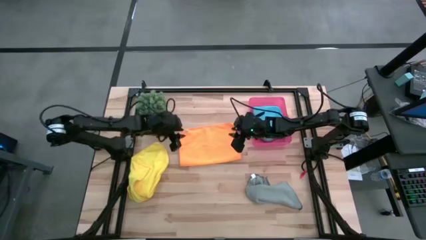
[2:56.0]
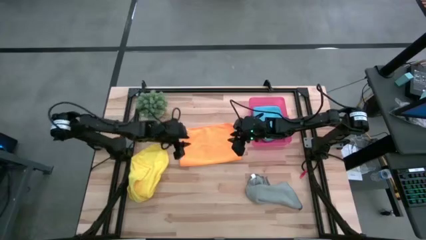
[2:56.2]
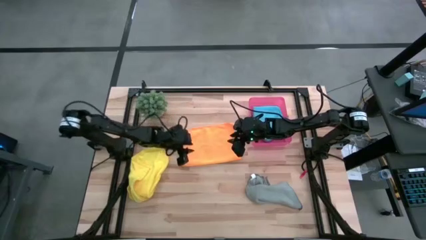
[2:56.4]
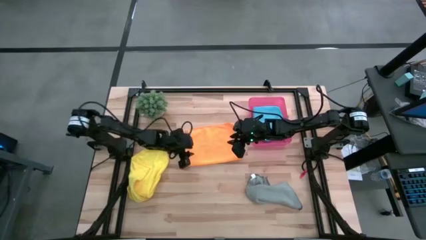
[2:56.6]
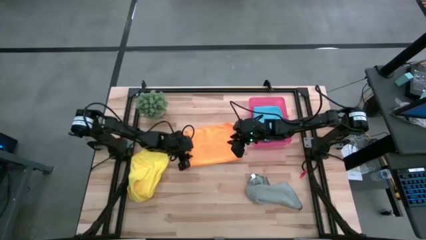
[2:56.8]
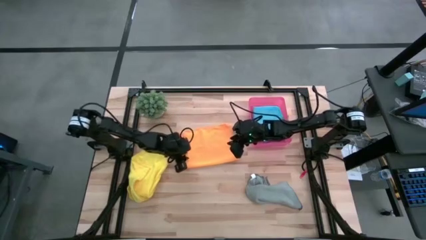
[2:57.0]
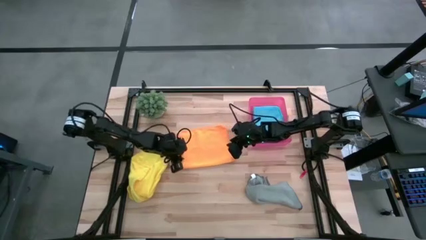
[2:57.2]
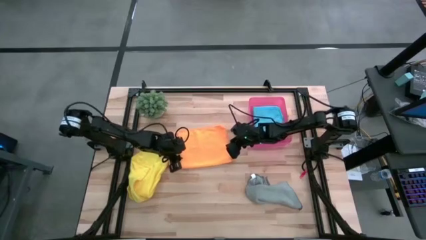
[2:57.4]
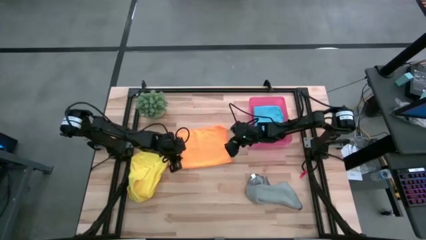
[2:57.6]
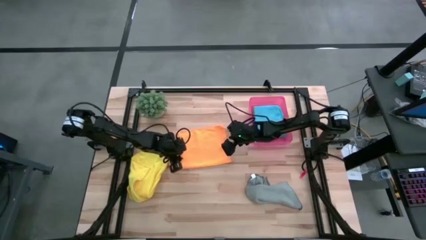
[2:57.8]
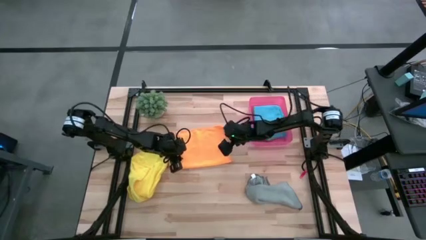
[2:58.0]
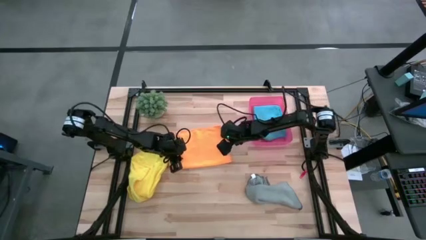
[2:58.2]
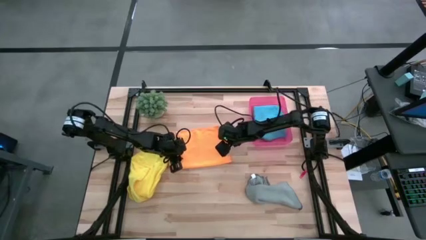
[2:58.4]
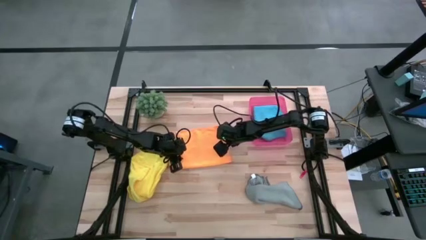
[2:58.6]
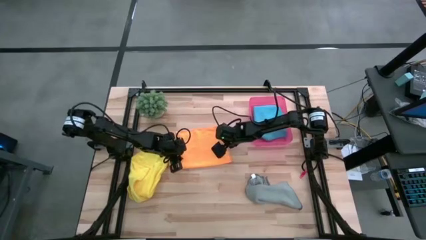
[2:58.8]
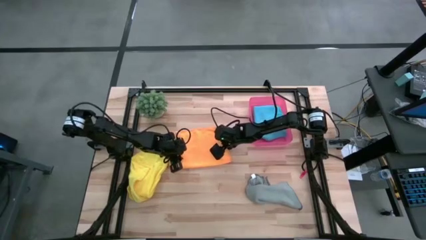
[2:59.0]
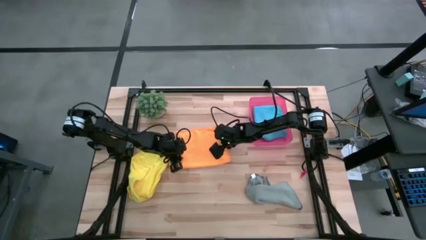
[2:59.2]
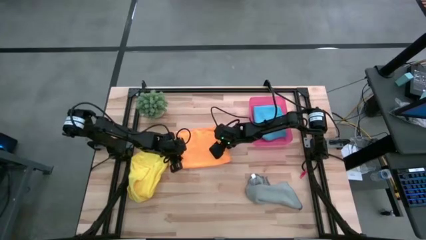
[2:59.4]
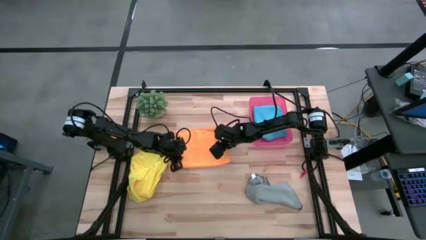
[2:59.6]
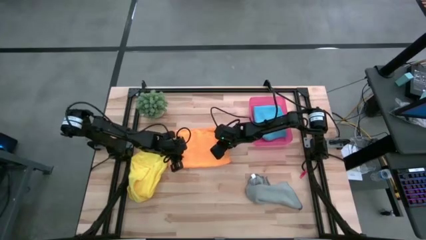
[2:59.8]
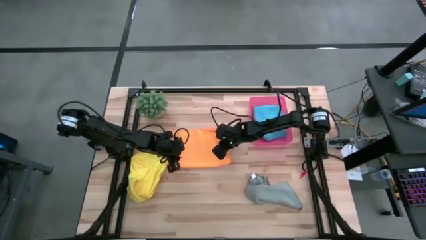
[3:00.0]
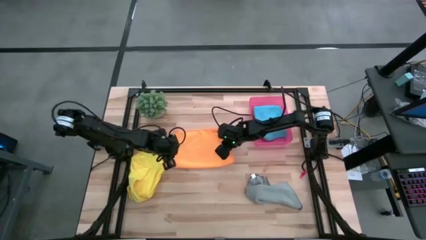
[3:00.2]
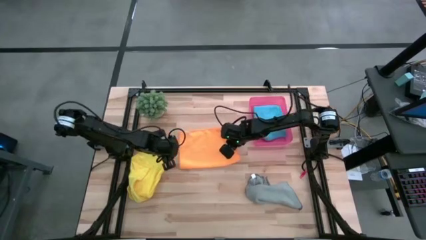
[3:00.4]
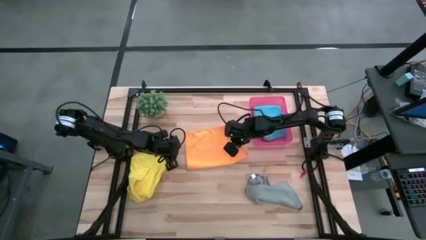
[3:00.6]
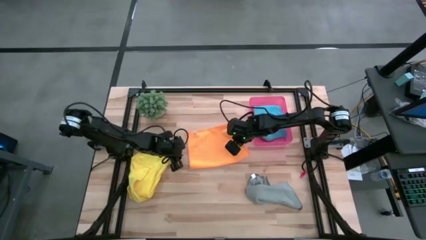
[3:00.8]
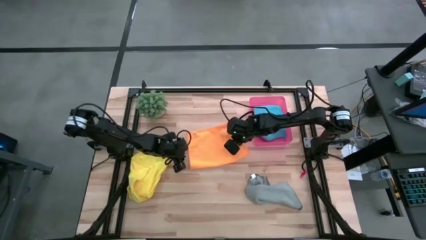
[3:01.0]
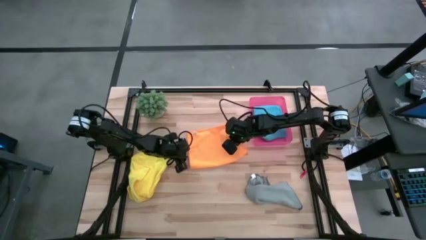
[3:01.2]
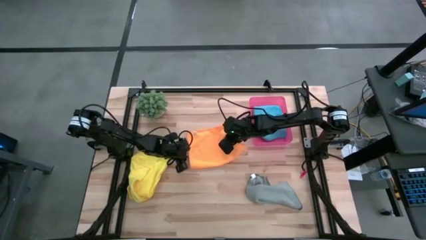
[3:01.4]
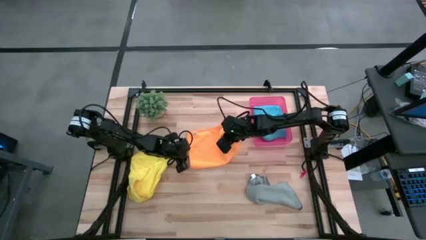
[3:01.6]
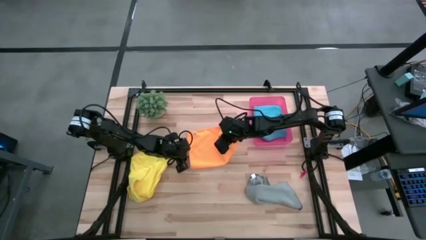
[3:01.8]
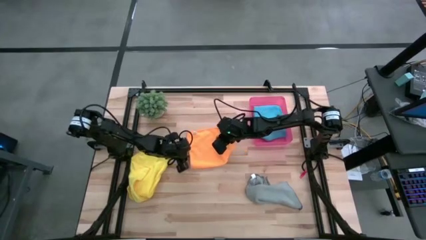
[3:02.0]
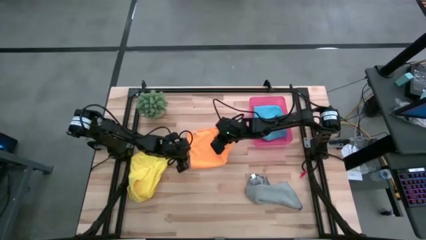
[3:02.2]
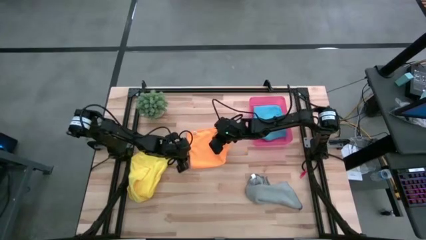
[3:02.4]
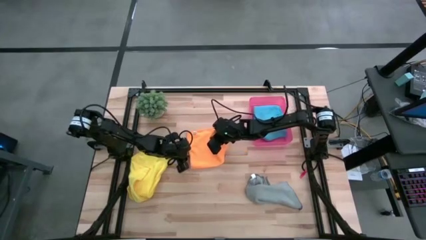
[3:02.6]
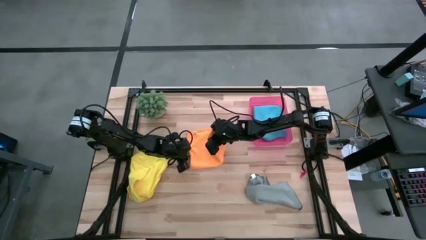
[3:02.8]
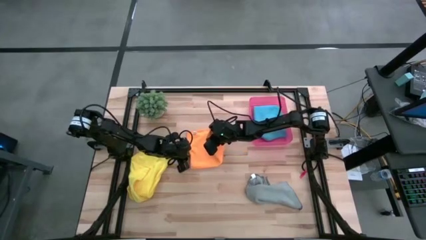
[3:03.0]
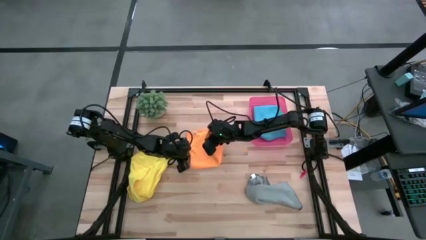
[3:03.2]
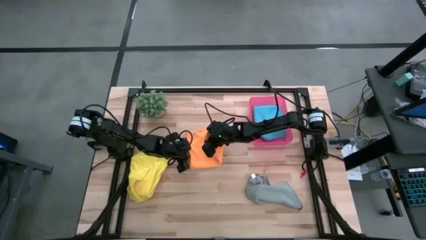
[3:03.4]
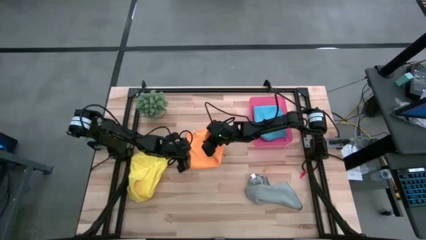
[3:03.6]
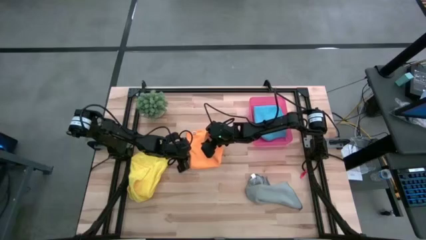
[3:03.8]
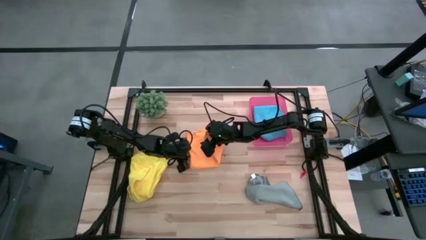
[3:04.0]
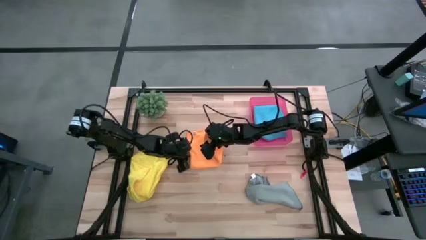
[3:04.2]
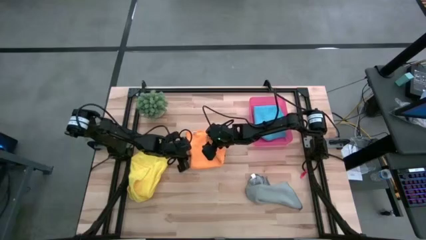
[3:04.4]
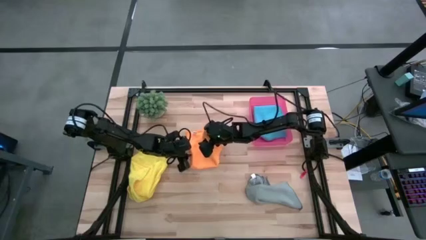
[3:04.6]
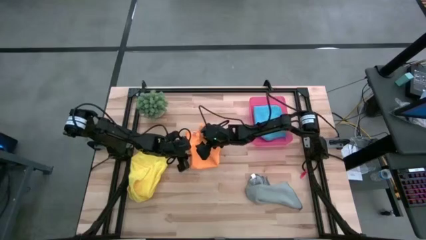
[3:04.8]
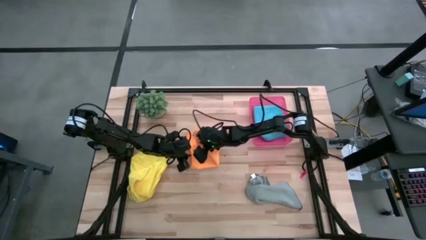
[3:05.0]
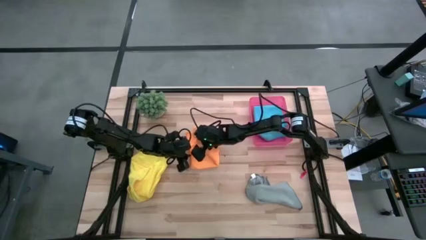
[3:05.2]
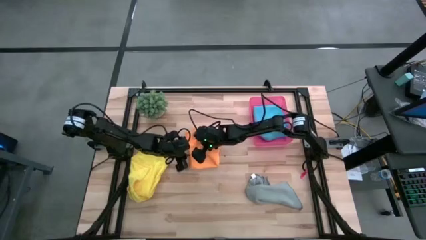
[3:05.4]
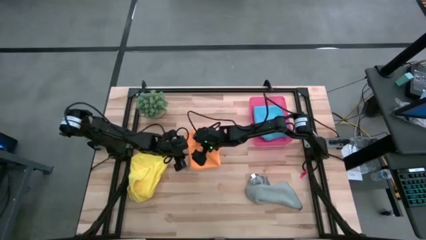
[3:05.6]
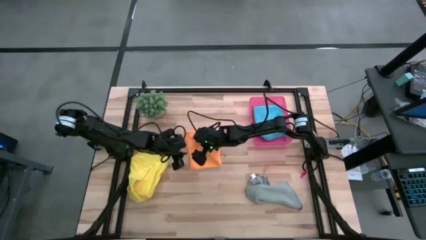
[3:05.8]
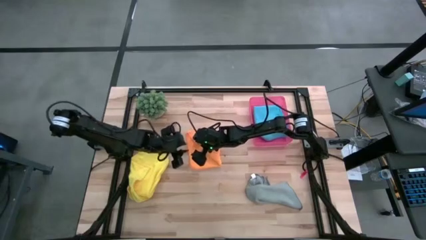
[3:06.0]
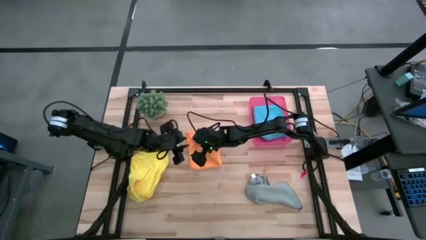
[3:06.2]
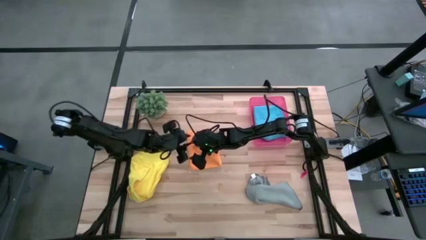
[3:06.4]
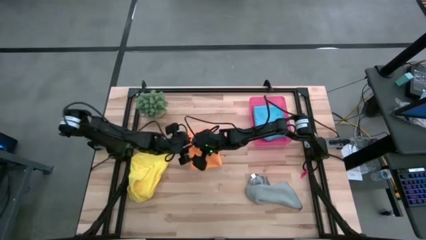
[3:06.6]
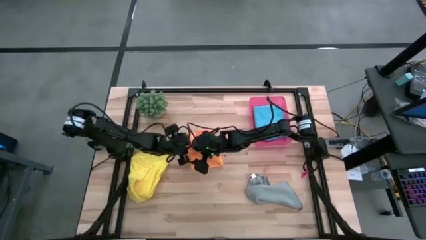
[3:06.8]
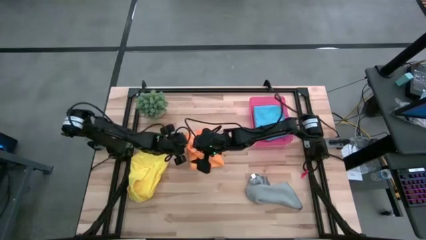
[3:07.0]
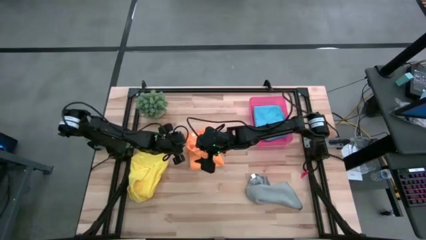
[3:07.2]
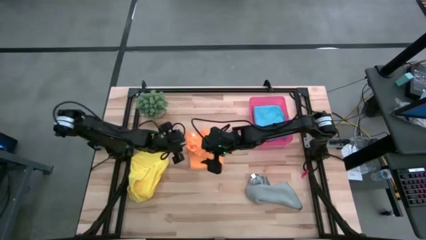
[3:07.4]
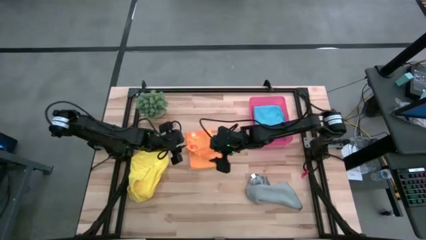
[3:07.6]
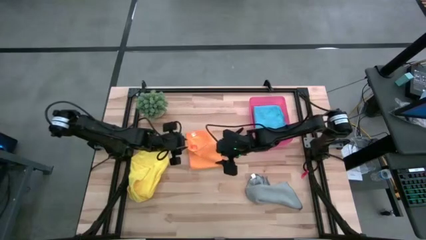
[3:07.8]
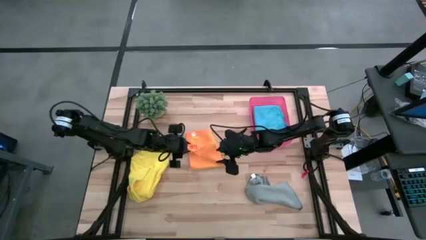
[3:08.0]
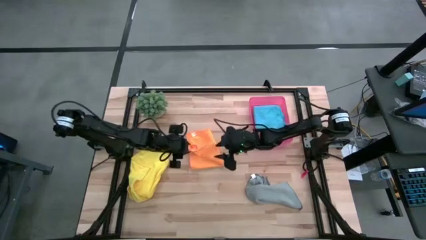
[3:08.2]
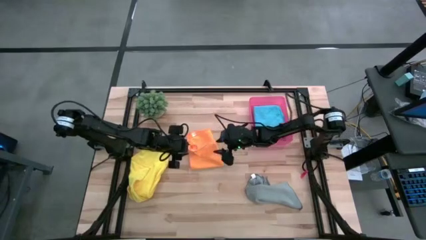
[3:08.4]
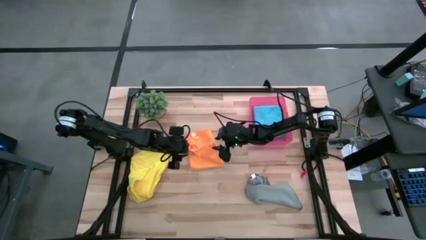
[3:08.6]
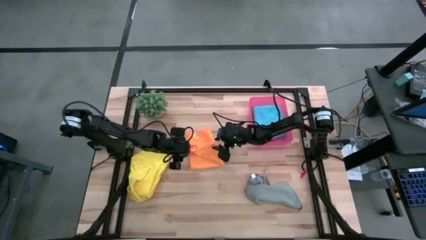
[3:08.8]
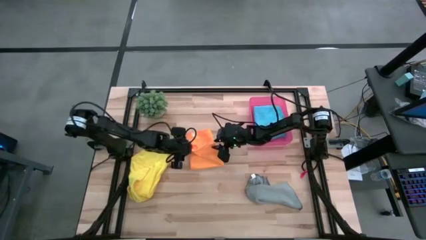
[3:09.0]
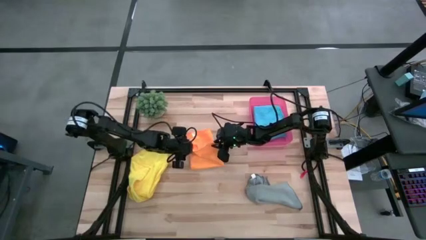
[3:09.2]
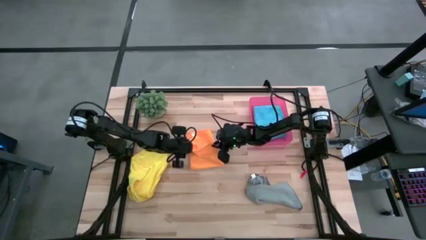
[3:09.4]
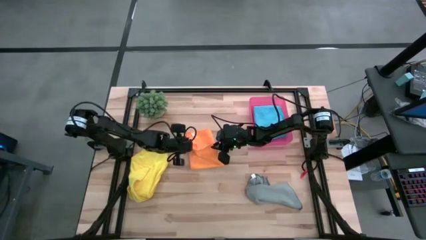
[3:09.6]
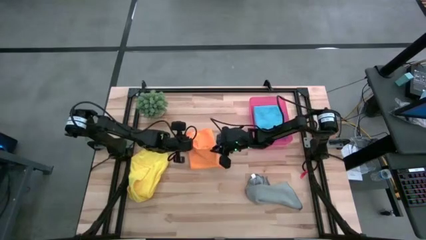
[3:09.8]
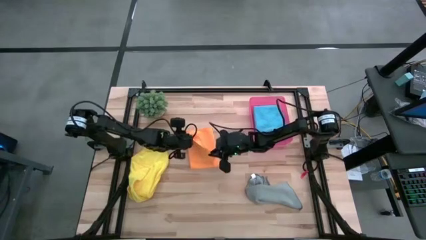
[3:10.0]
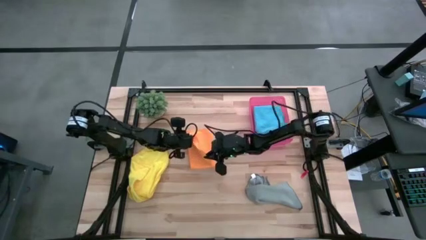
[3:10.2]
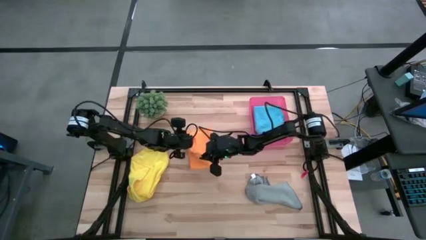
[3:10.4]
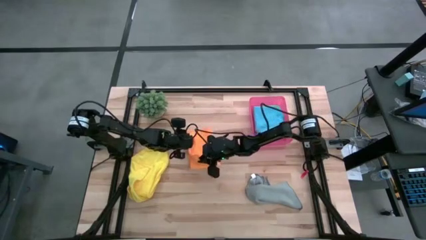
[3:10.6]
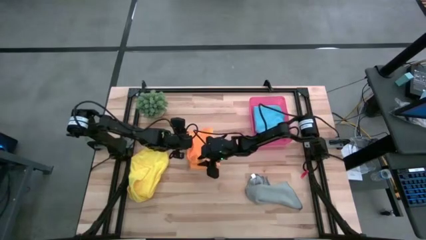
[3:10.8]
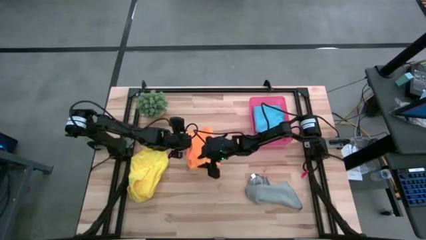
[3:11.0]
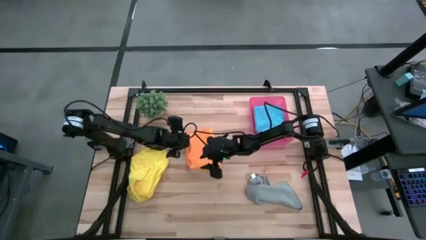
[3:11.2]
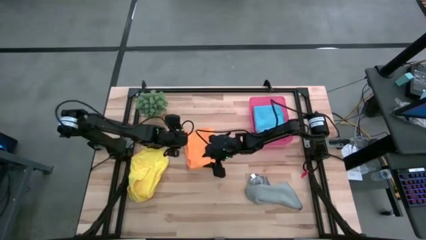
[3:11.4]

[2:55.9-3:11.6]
Task: Fold microfiber towels
Fold the orange microfiber cloth
